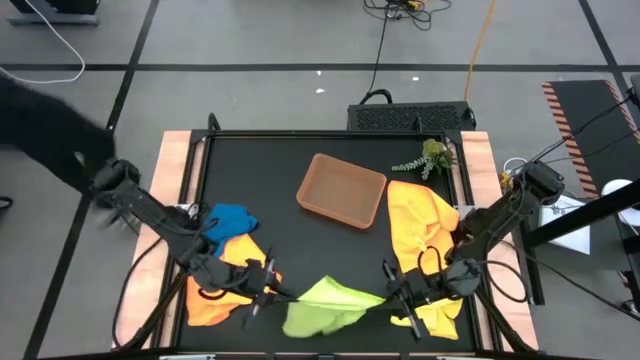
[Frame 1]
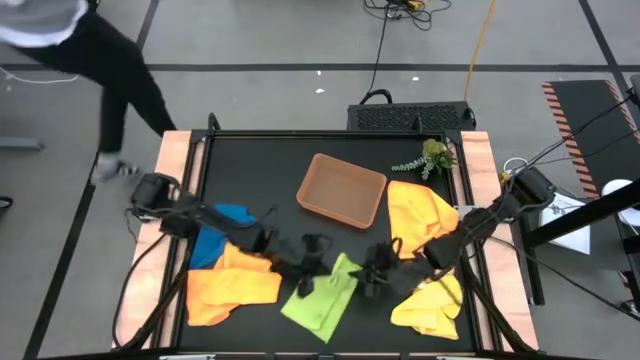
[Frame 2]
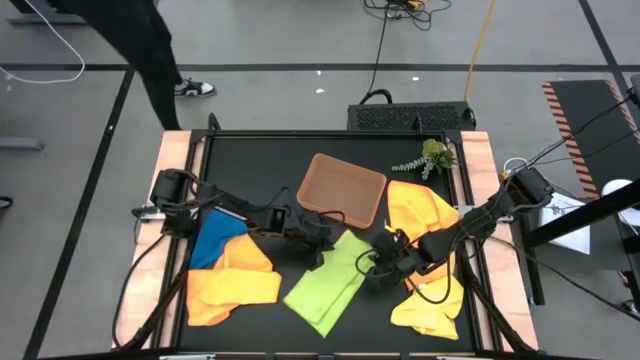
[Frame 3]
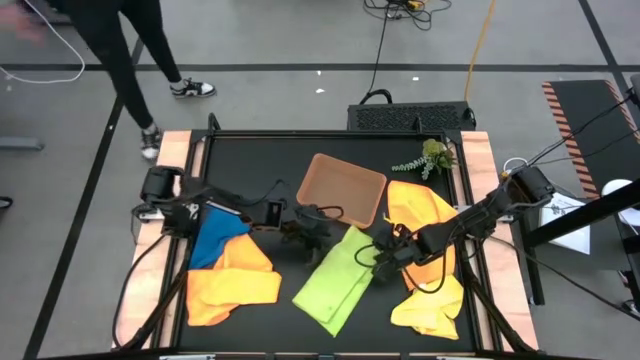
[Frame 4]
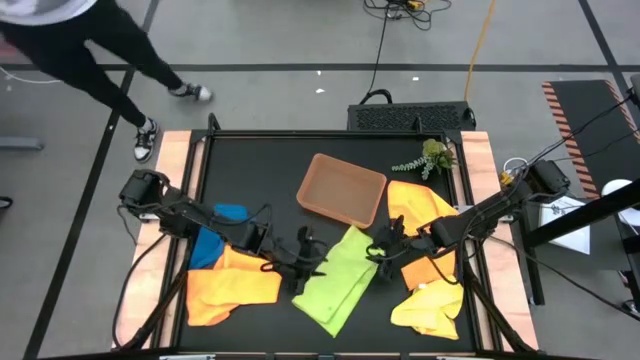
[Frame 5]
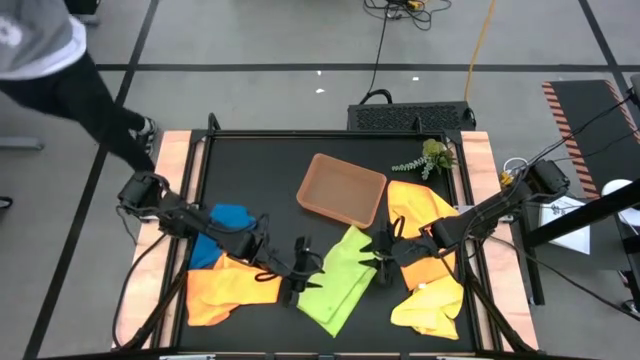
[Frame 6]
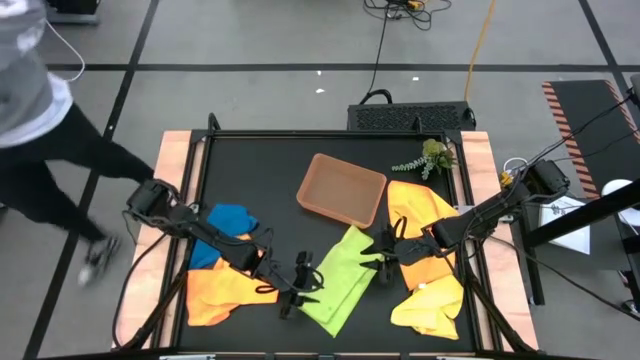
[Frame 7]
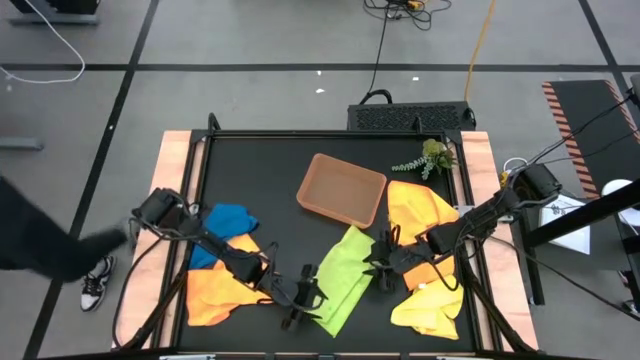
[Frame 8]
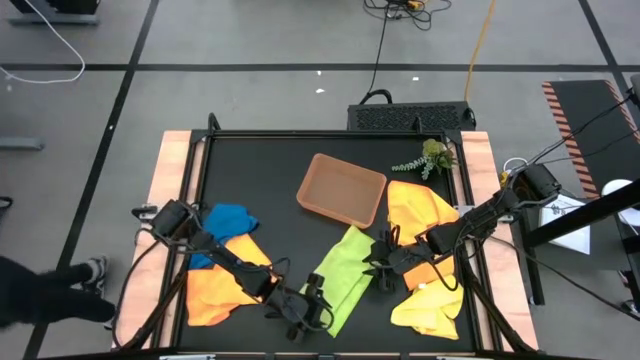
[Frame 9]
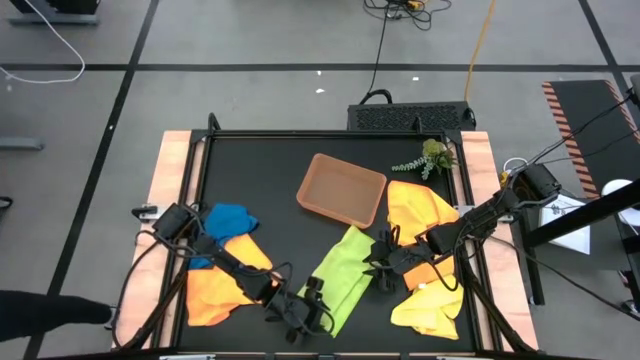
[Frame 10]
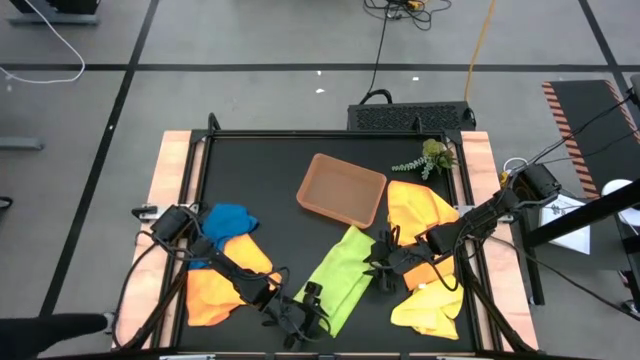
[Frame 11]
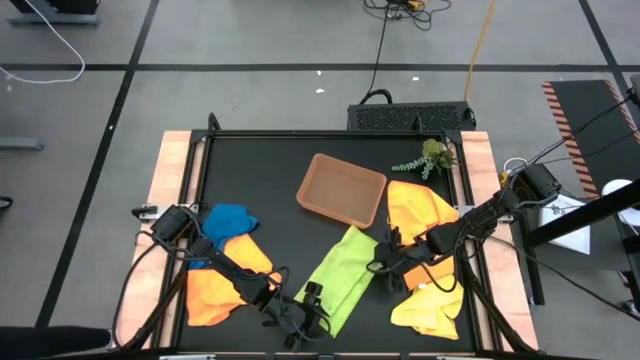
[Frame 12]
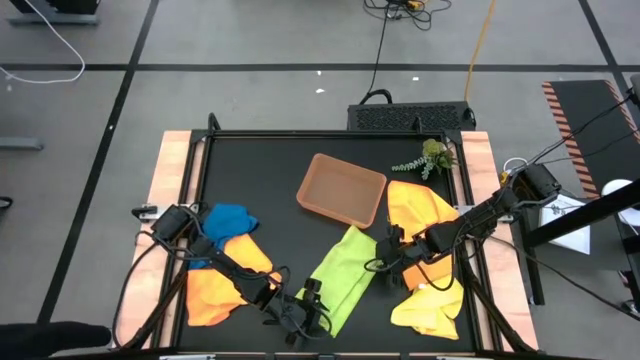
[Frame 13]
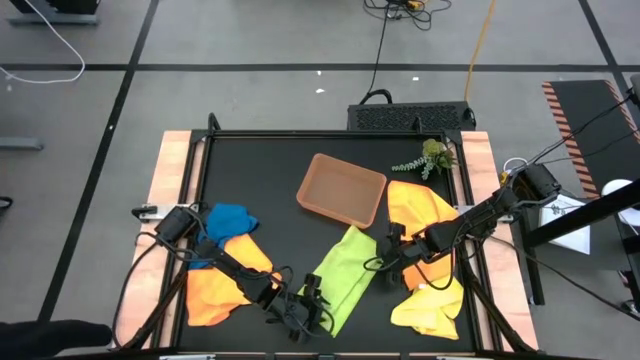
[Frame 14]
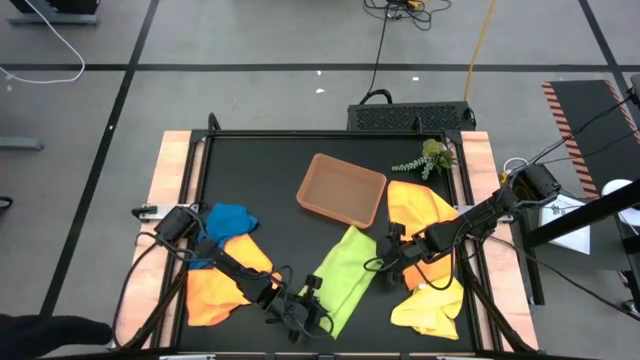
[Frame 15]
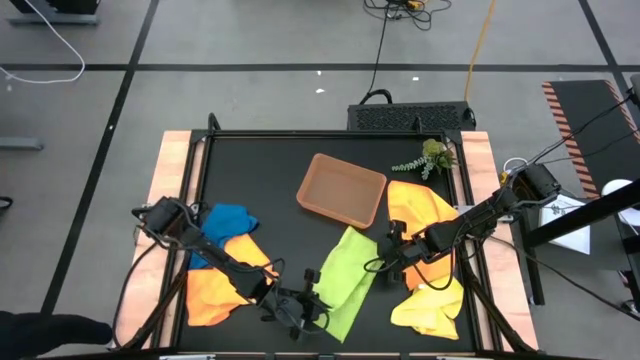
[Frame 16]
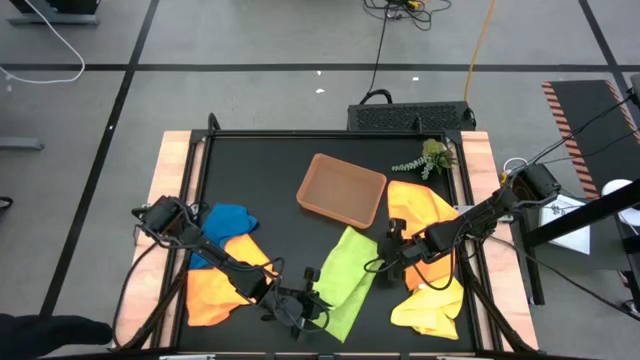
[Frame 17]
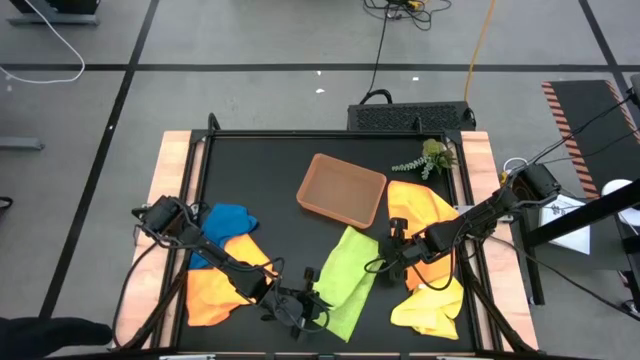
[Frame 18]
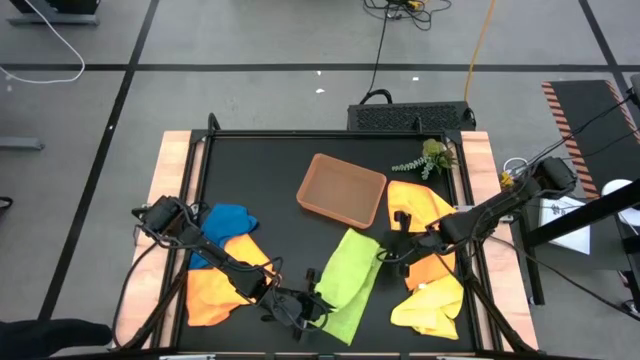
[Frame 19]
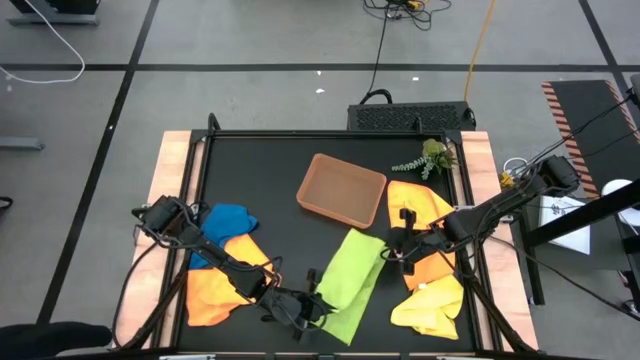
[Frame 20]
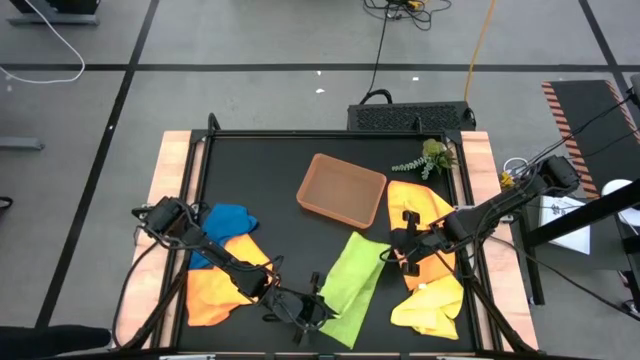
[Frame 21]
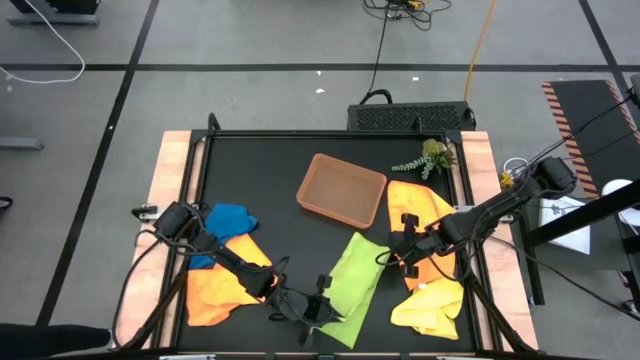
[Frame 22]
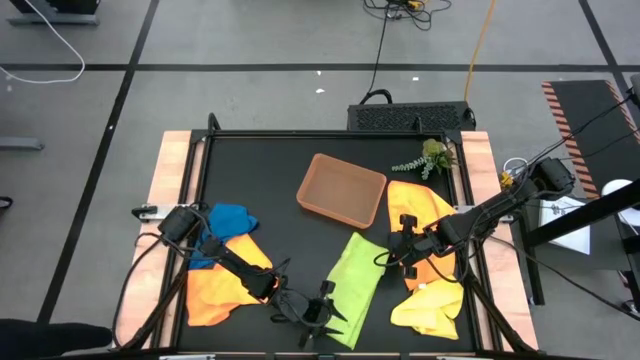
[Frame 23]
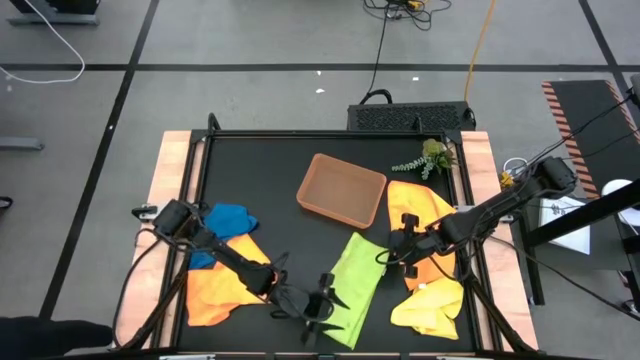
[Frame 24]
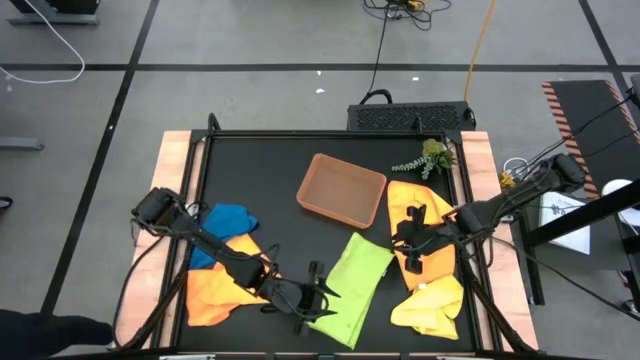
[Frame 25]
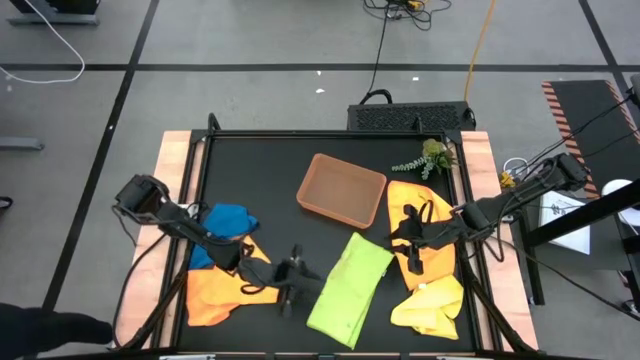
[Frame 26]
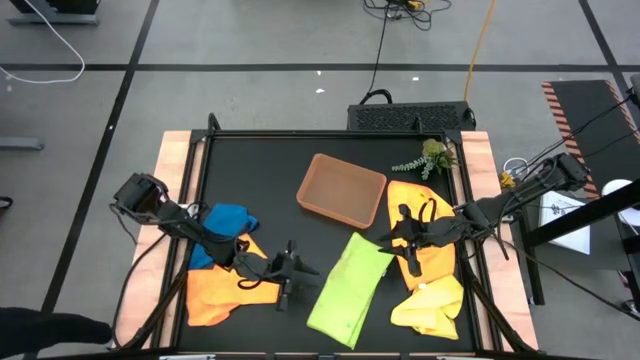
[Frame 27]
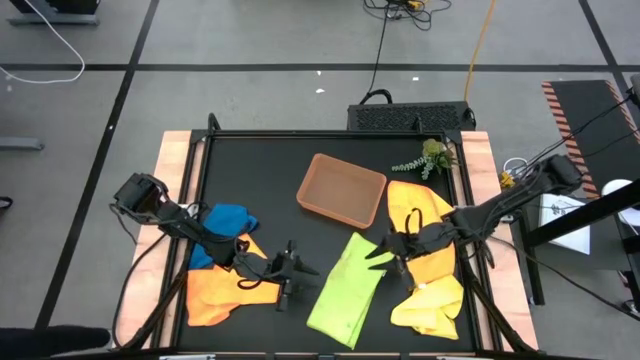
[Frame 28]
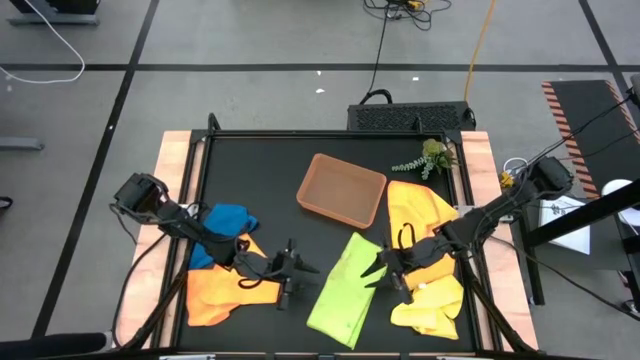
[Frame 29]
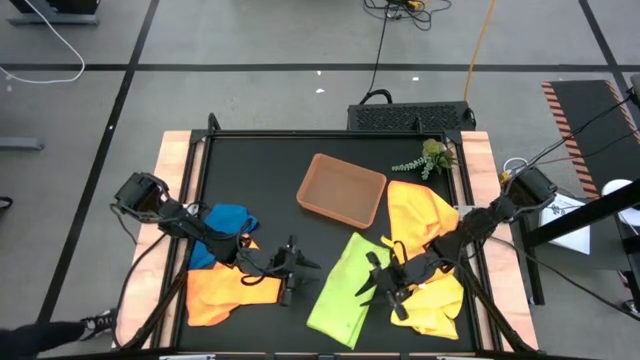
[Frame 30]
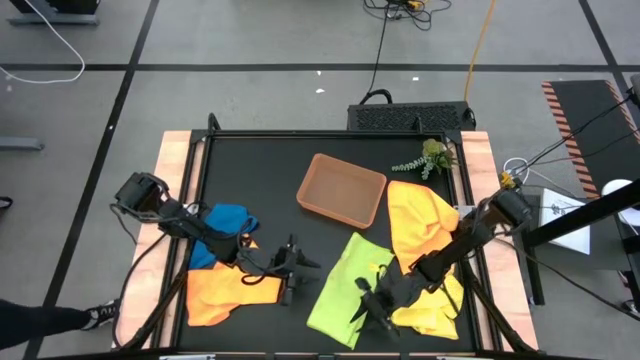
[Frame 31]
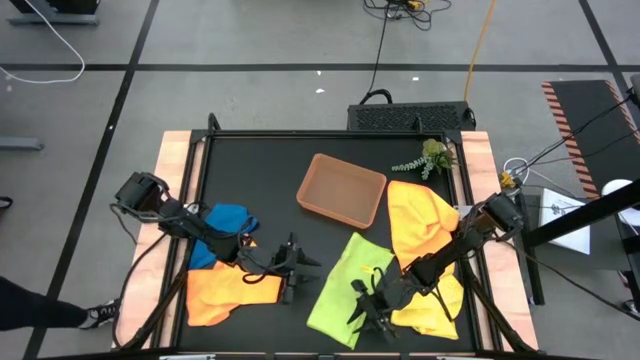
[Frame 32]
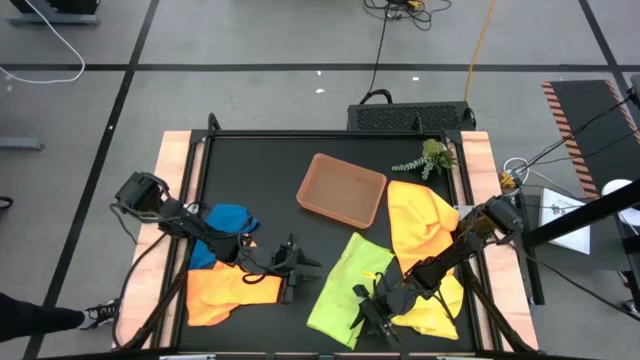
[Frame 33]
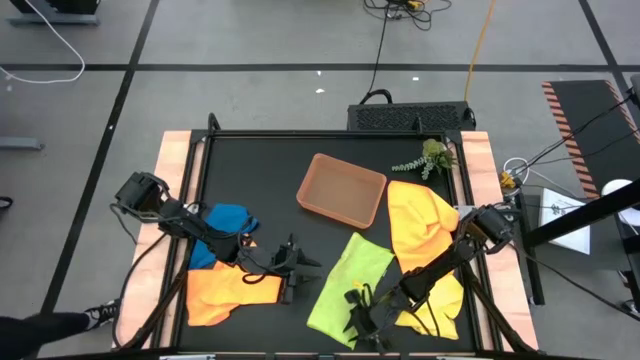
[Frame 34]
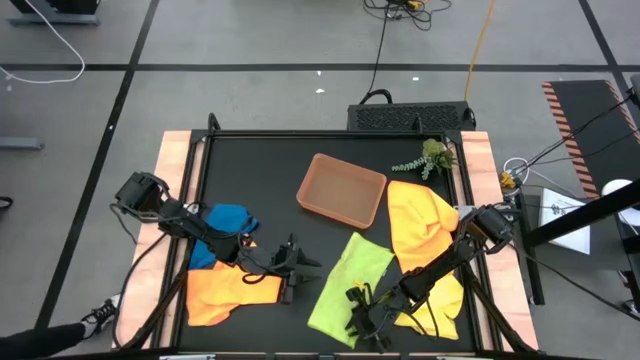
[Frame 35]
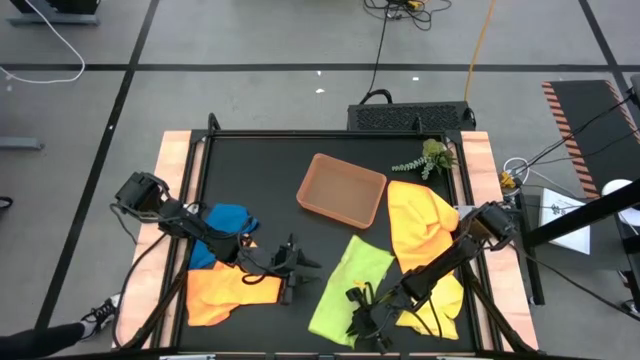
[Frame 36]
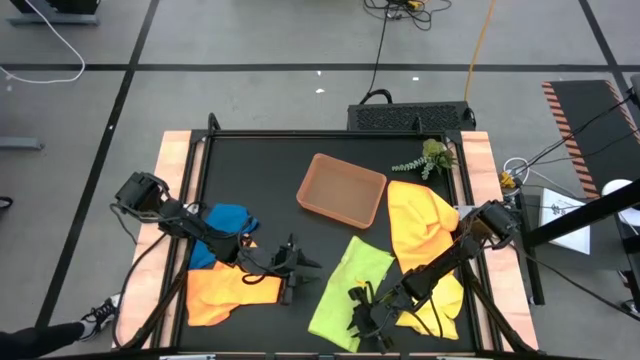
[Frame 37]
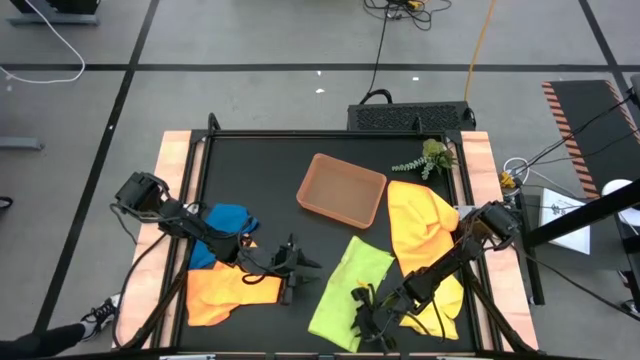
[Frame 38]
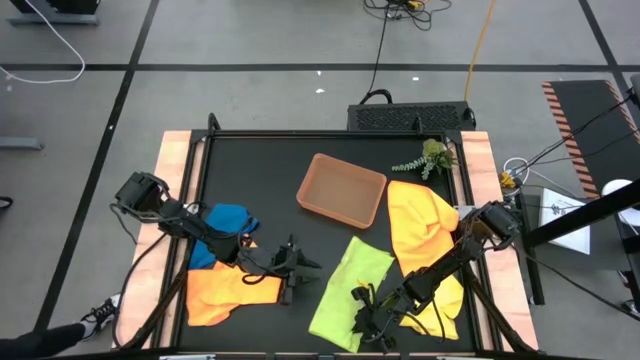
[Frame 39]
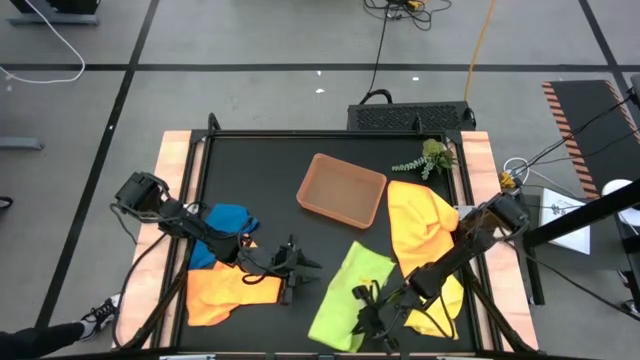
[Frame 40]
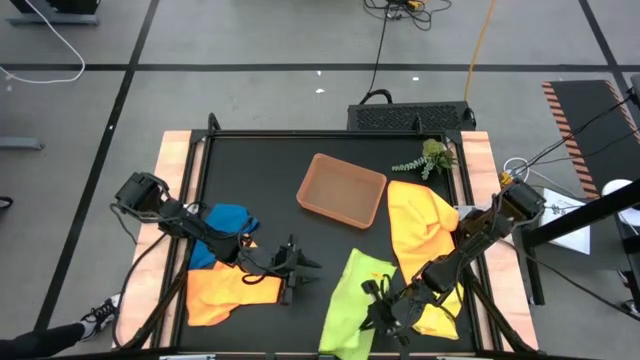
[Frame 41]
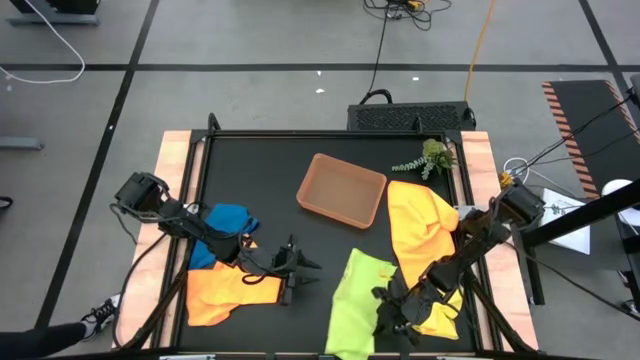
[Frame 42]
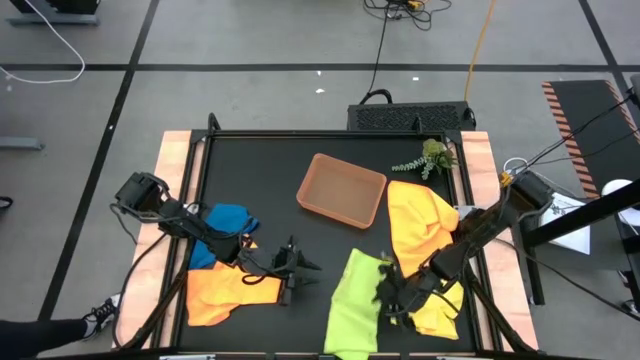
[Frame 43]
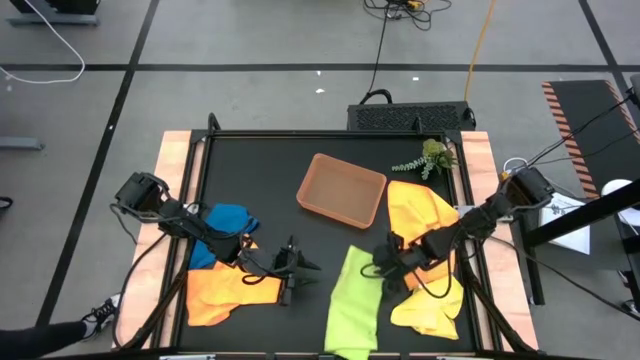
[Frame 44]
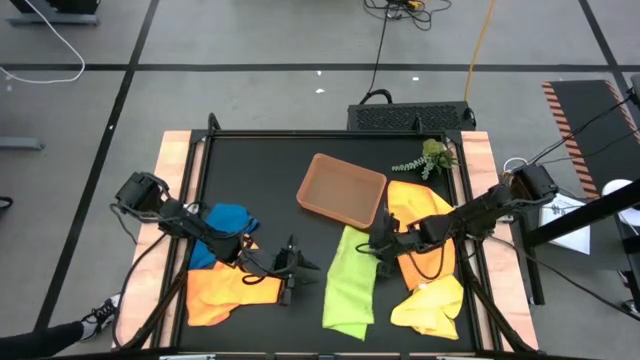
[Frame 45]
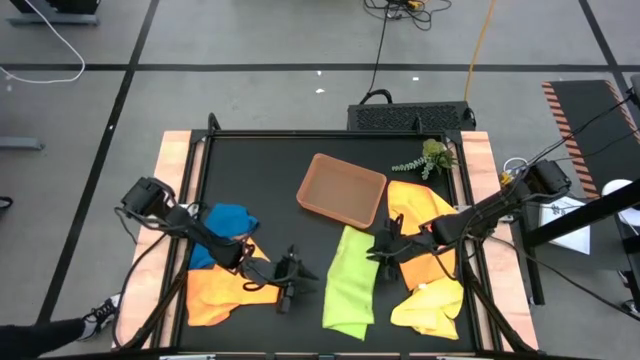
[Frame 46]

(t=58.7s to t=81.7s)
Task: Fold microfiber towels
Fold the green microfiber towel
